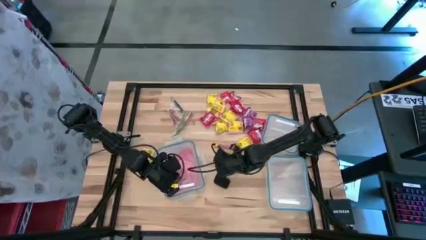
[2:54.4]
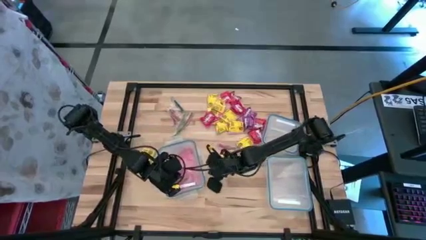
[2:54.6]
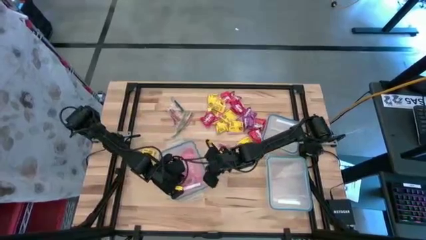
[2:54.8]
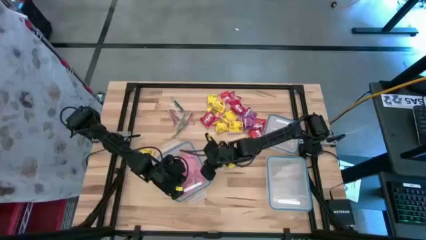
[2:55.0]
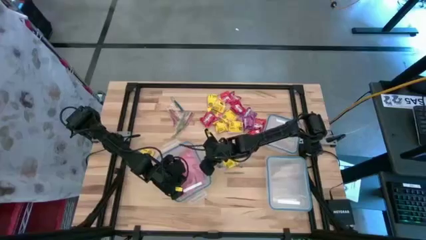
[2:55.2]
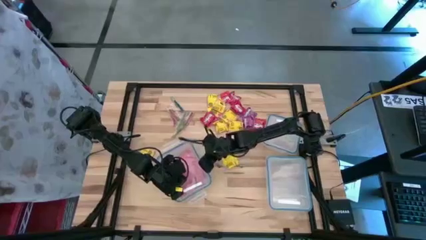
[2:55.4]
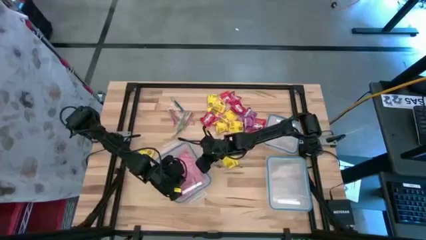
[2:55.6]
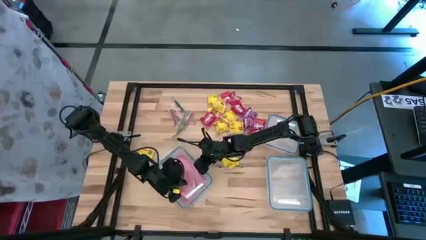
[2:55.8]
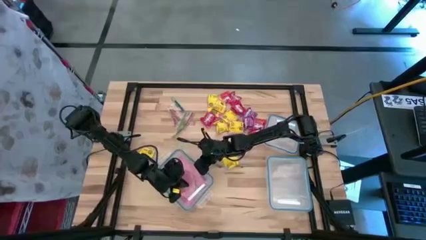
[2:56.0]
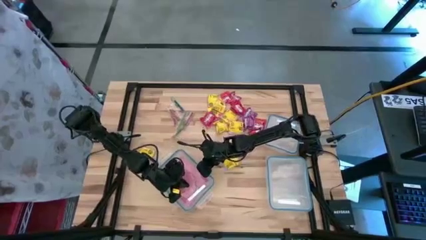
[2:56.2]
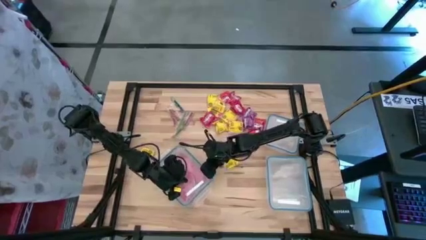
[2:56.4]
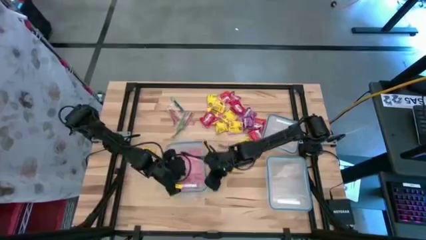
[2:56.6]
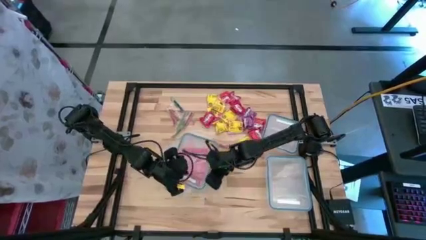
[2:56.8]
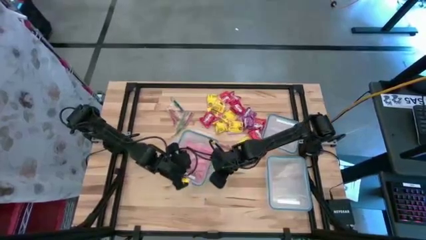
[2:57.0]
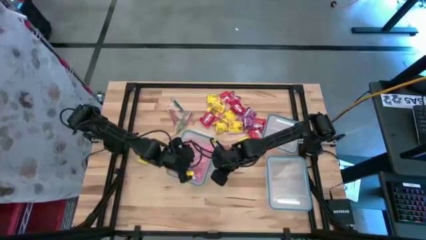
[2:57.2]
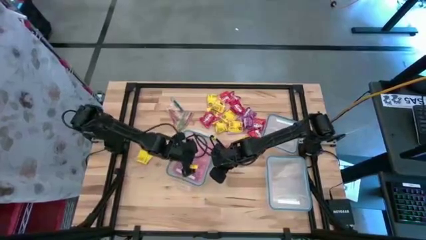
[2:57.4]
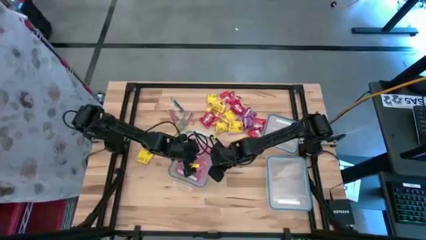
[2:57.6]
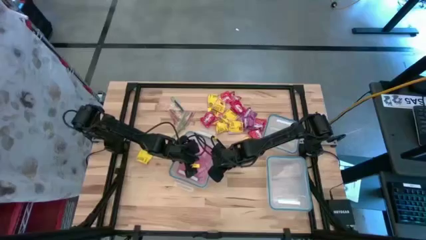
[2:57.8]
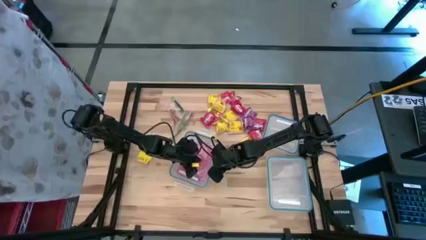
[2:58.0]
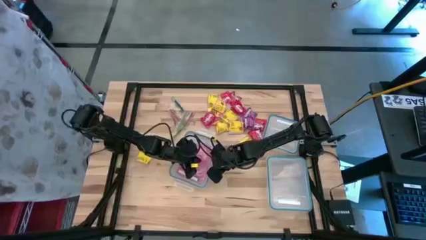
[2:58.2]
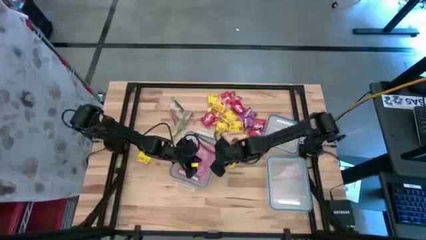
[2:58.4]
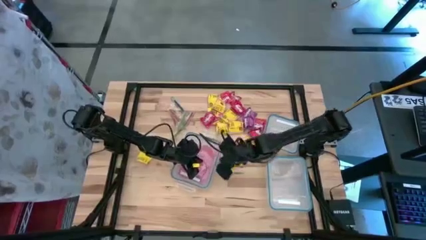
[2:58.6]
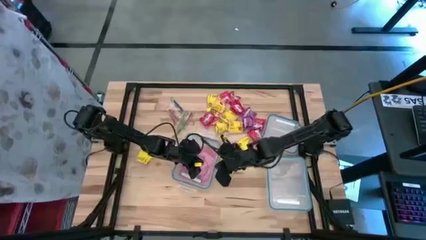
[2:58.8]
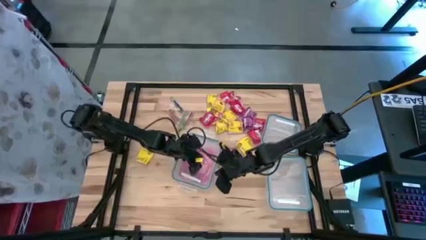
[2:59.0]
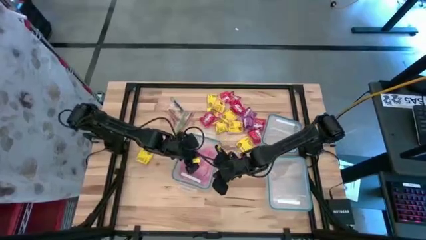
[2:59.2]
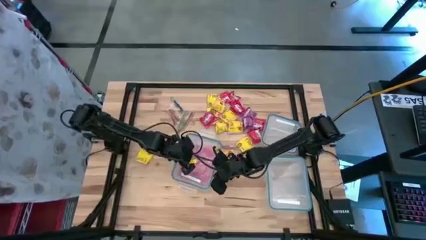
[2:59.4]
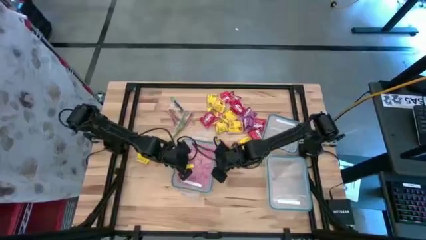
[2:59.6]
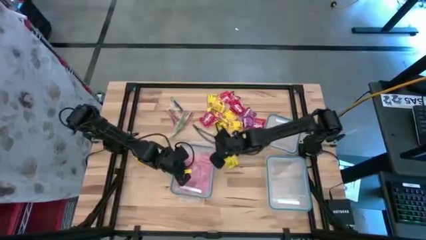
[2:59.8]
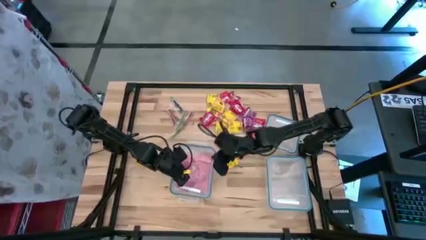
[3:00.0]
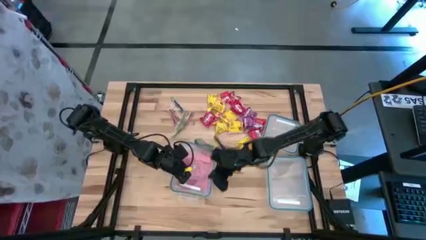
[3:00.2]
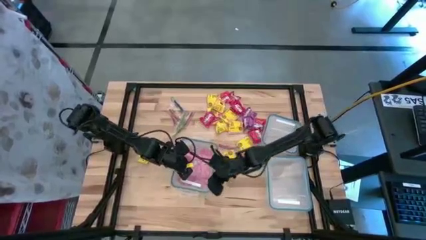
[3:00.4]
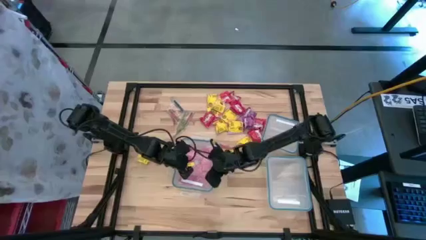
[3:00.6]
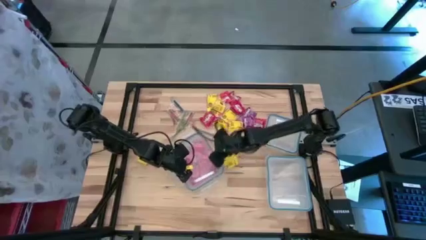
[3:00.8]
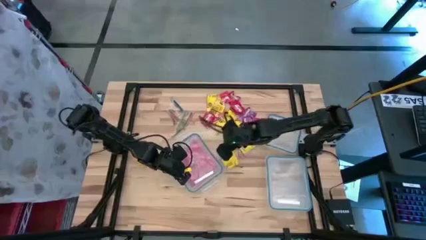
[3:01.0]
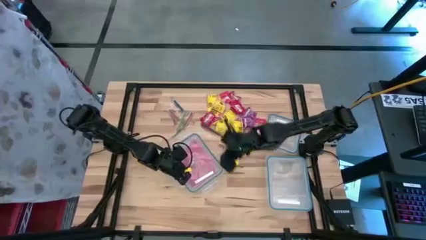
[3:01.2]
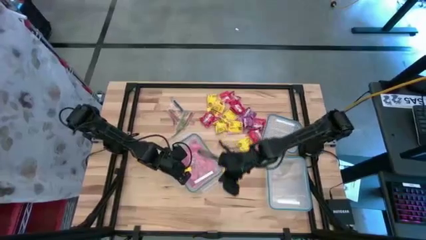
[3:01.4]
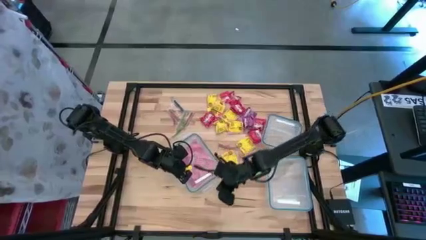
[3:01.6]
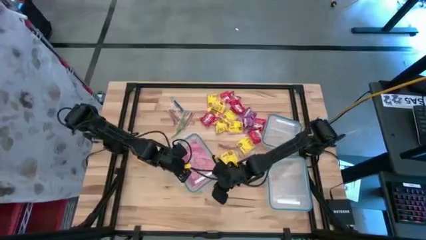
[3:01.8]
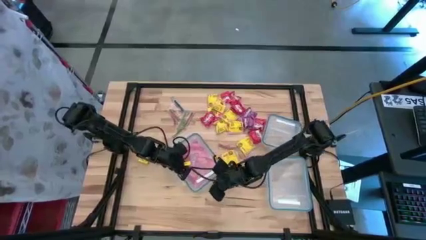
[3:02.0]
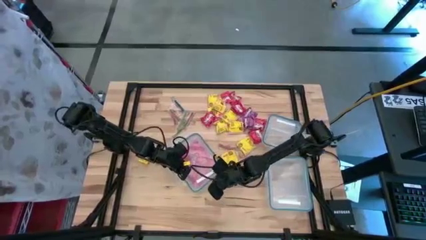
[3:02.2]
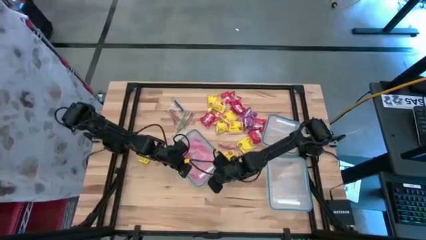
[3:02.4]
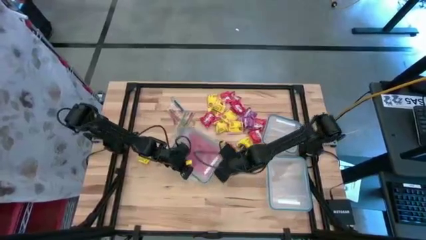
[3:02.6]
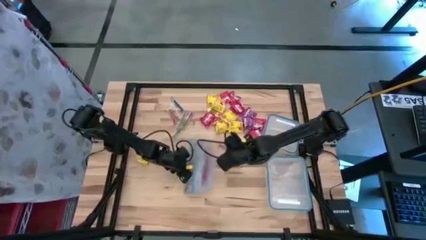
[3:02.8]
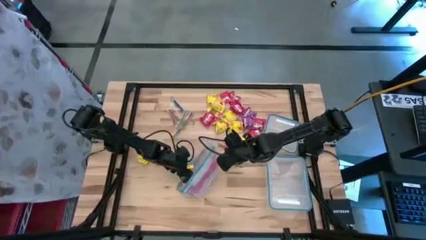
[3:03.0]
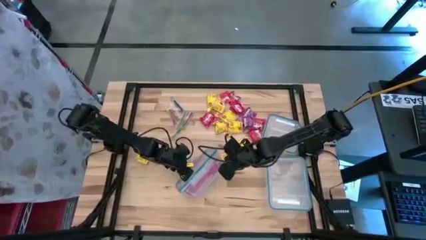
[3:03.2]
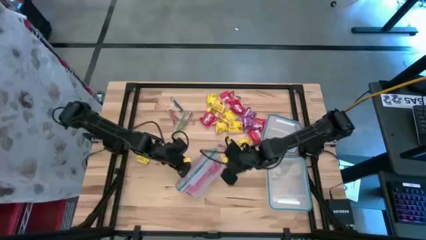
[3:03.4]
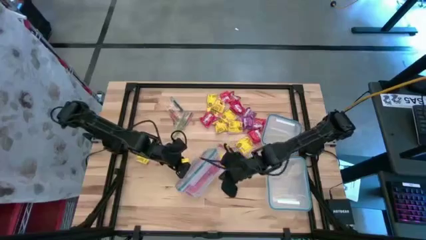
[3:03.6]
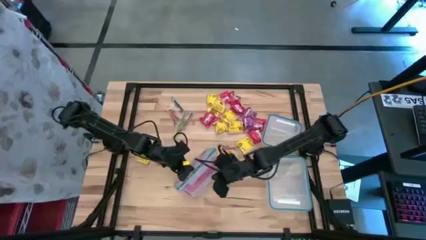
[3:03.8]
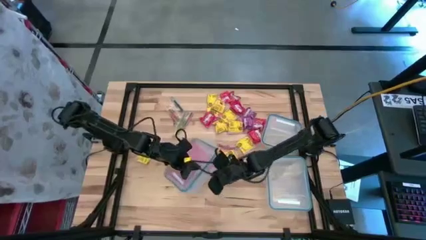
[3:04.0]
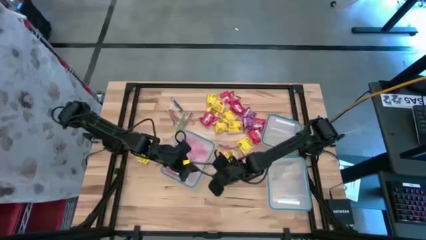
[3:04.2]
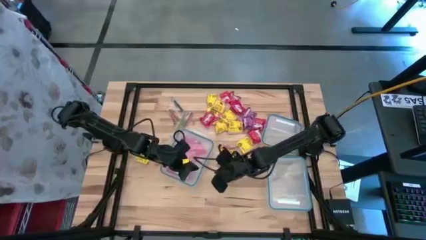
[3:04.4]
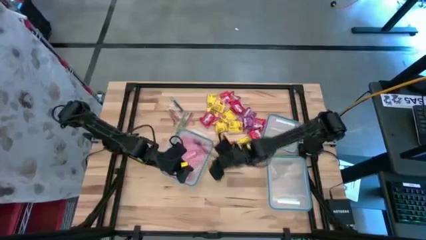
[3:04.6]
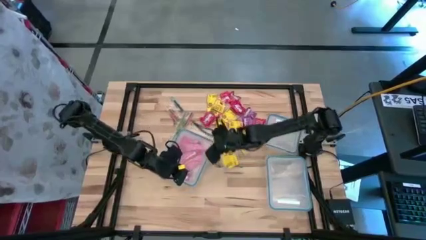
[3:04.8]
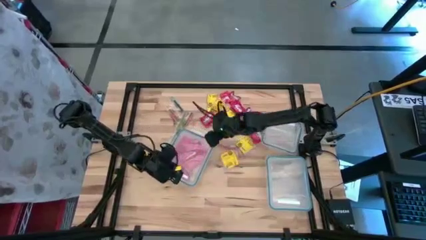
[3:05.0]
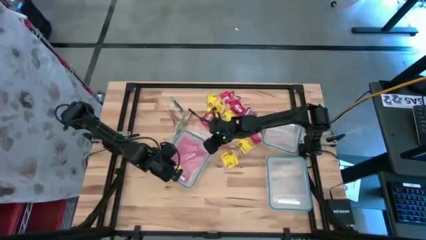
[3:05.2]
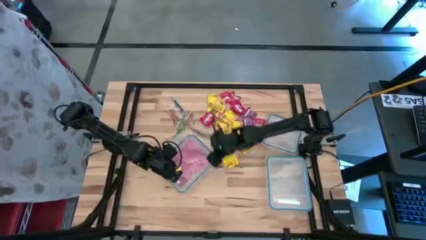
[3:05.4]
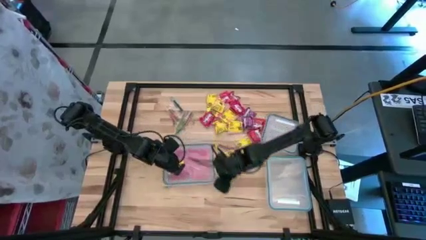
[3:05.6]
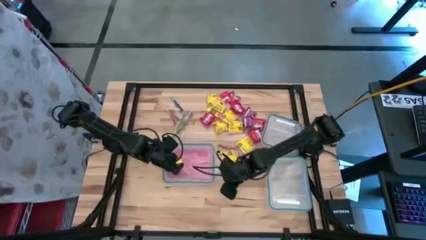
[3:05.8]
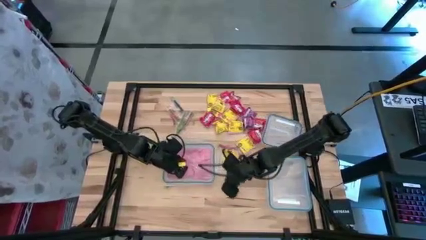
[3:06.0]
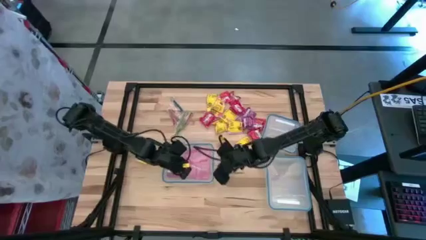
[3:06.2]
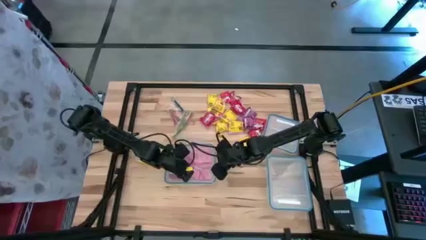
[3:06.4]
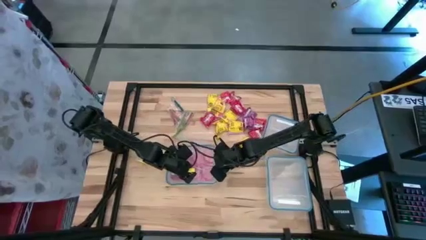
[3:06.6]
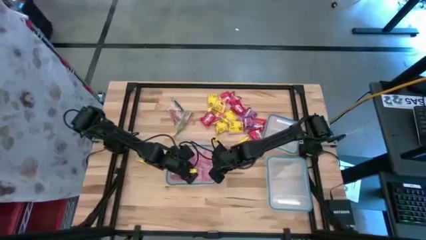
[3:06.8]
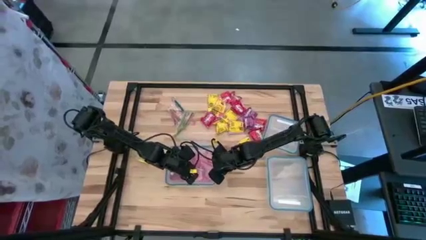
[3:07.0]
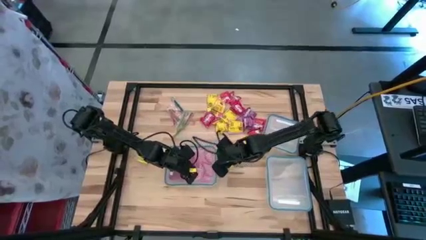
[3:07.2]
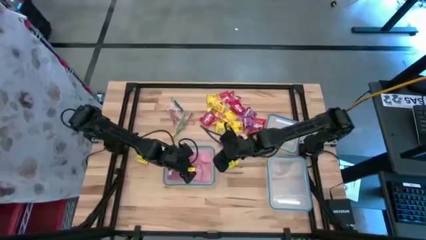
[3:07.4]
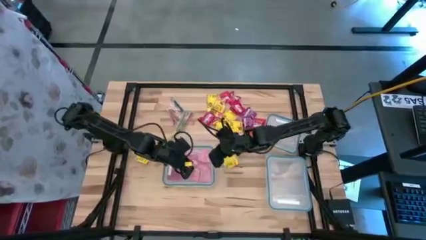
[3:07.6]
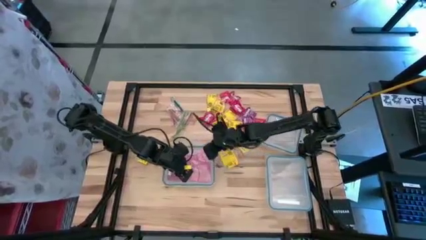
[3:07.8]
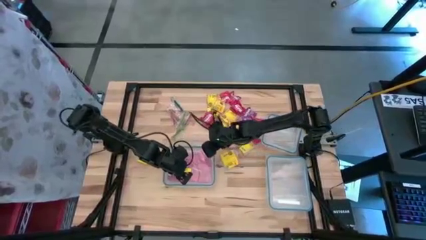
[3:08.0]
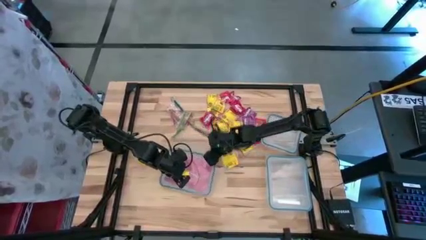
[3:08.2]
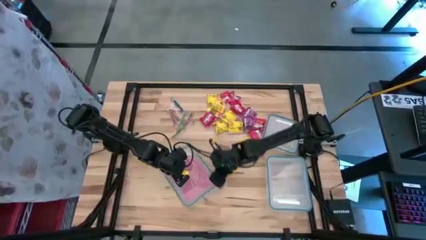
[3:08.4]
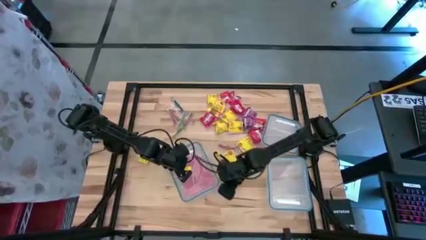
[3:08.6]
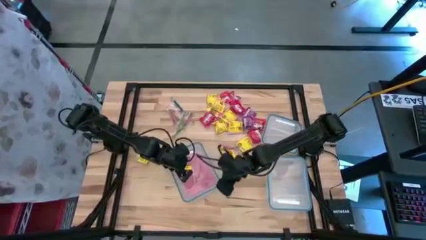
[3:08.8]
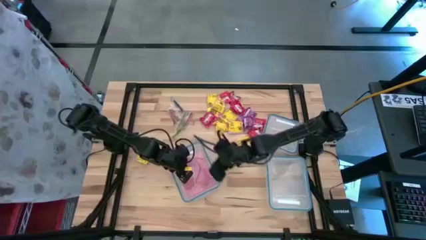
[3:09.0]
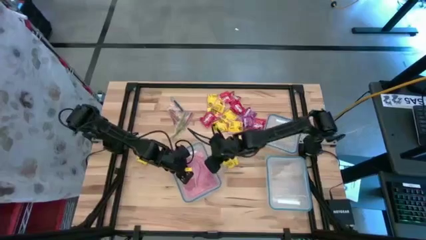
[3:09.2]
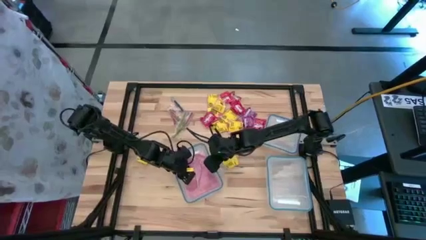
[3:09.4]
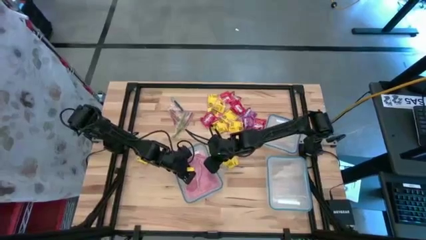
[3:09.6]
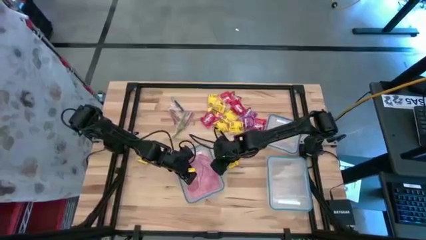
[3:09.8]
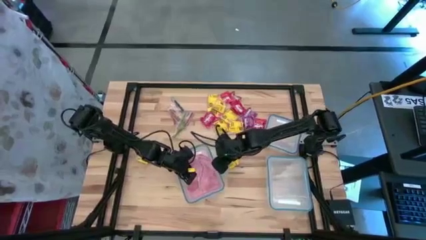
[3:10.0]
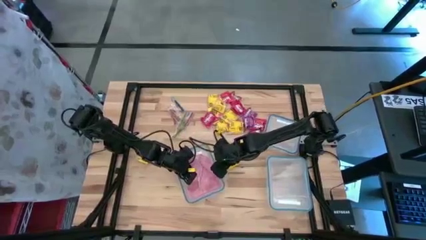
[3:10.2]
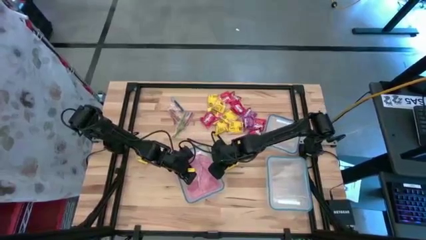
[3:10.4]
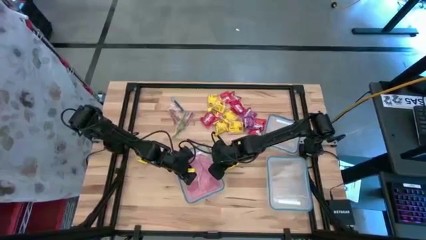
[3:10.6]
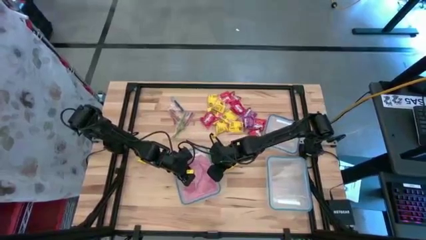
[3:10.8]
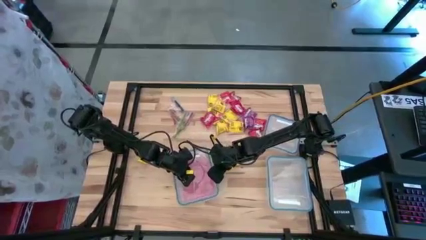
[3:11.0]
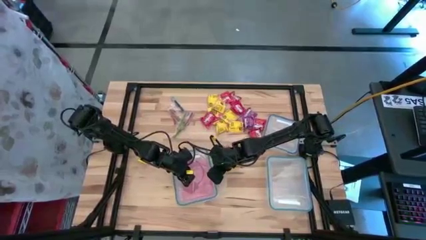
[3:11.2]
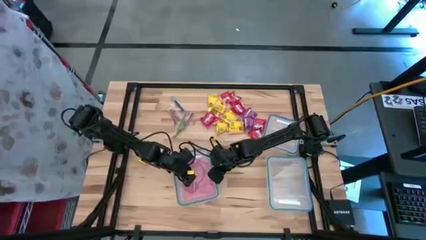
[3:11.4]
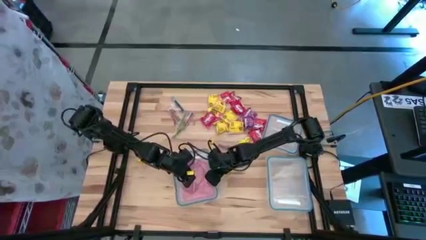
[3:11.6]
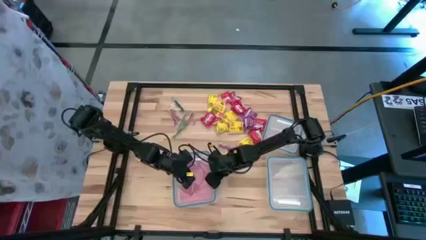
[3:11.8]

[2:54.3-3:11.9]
Task: Sort candy
Close the rectangular transparent bin
